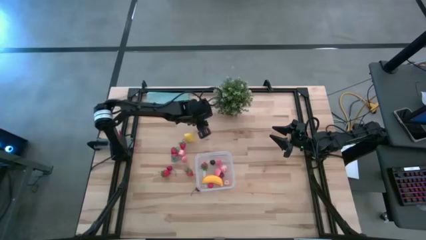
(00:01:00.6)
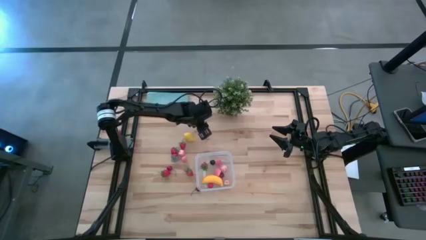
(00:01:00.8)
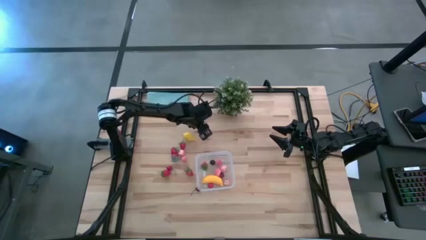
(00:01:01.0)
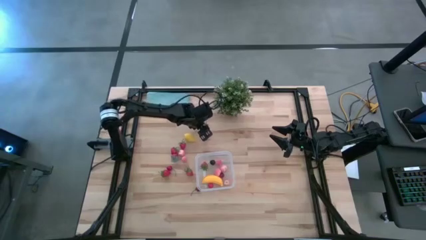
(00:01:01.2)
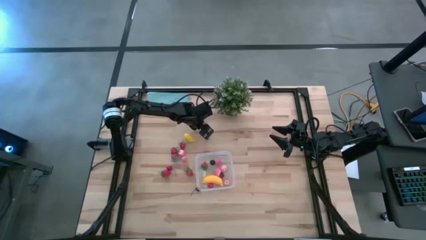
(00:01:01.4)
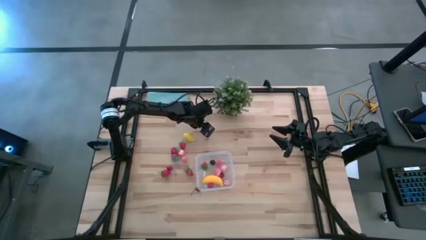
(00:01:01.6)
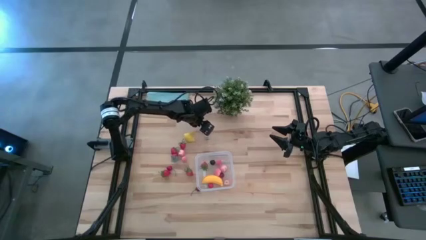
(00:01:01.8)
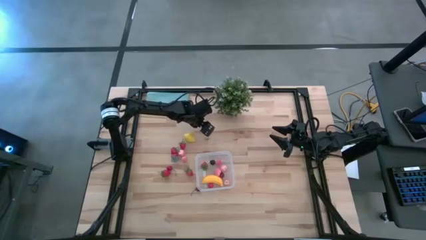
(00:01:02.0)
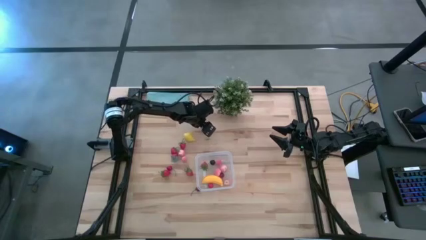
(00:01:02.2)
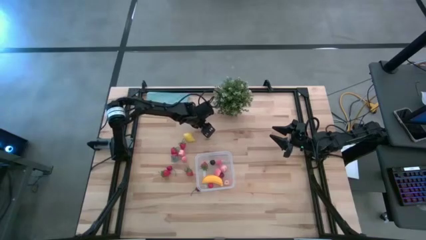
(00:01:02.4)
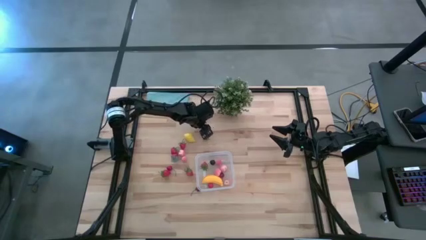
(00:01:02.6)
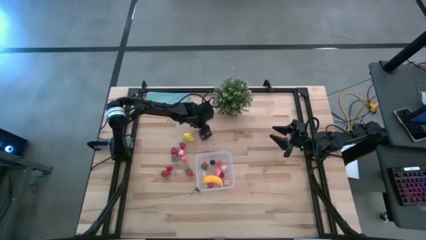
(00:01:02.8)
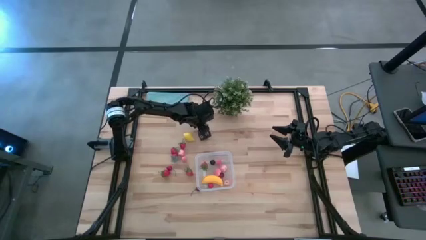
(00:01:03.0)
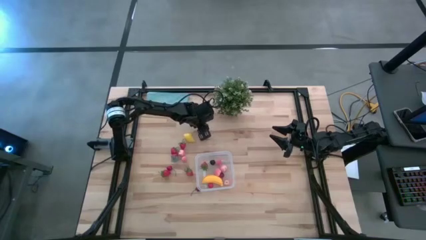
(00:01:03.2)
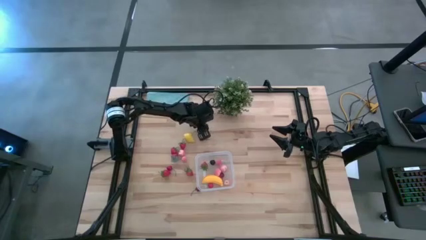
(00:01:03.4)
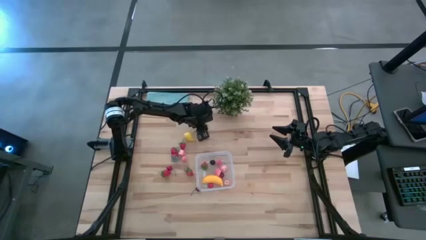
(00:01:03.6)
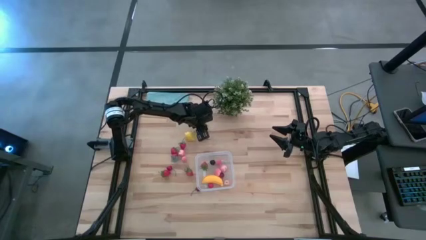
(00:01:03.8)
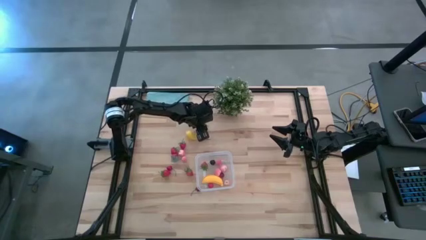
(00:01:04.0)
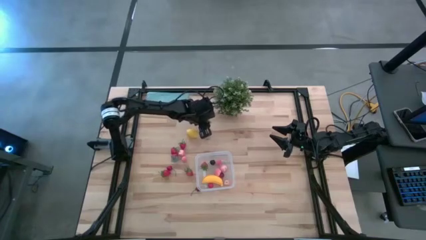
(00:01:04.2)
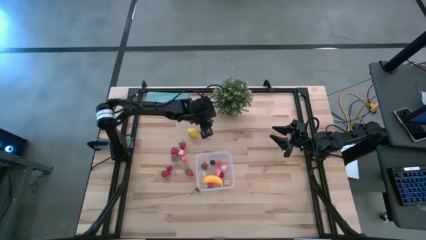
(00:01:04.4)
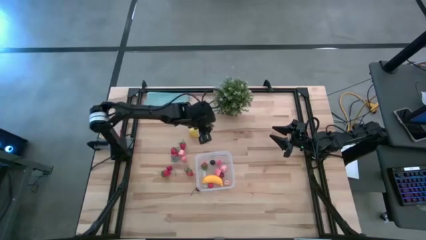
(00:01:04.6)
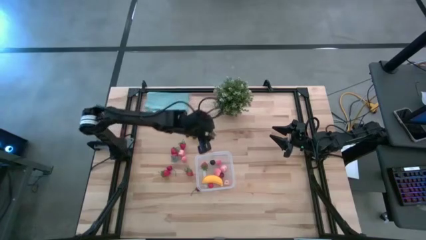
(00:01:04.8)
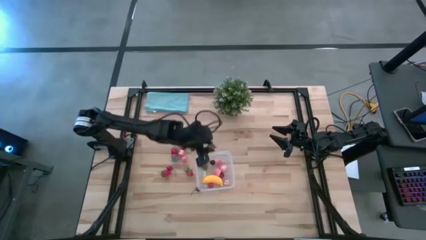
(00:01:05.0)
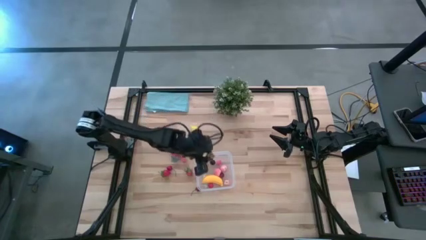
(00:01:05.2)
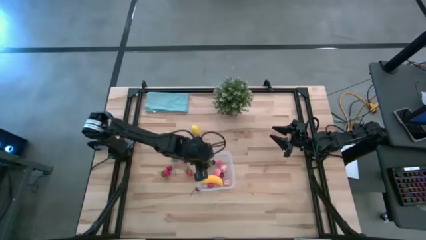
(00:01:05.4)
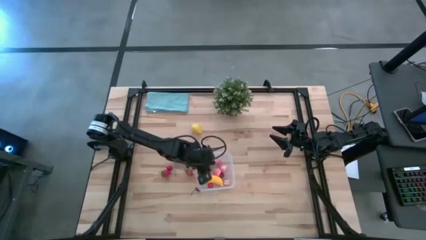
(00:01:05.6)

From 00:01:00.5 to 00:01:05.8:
Task: Pick and placing Produce into tupperware
Put the red strawberry into the transparent bin

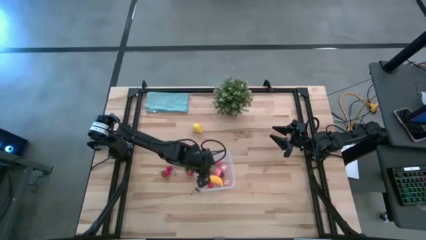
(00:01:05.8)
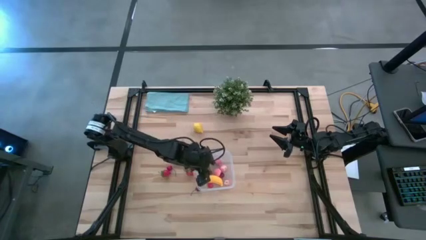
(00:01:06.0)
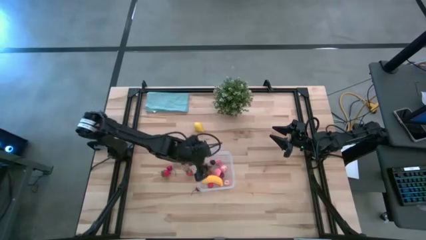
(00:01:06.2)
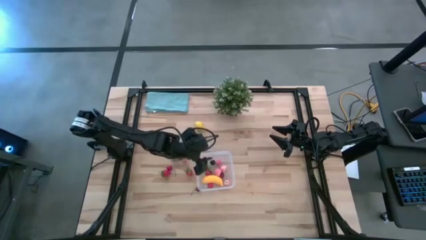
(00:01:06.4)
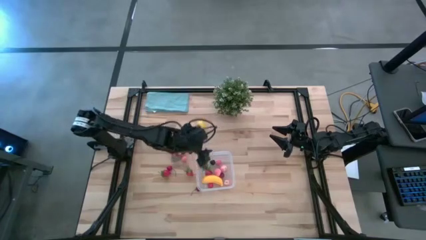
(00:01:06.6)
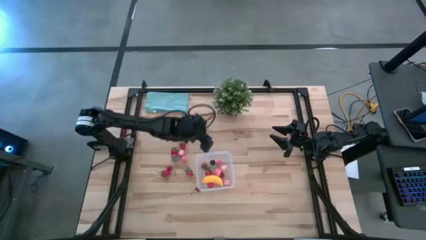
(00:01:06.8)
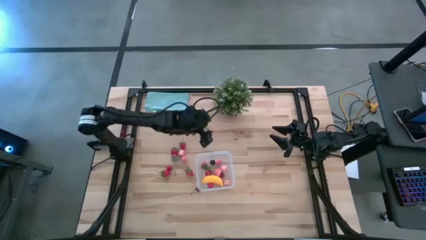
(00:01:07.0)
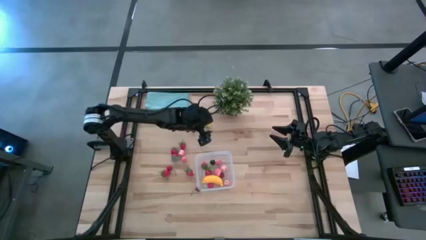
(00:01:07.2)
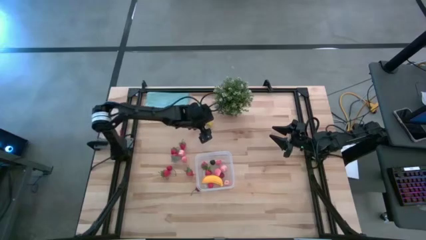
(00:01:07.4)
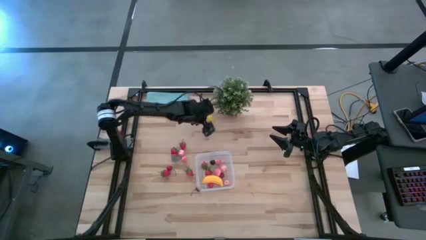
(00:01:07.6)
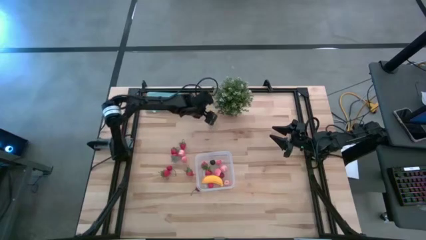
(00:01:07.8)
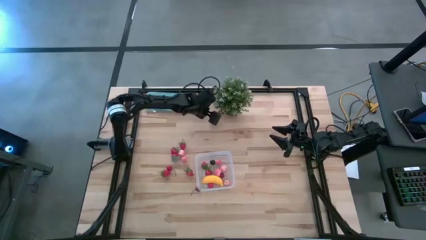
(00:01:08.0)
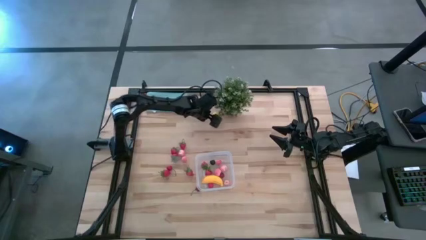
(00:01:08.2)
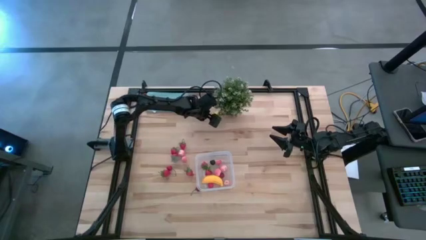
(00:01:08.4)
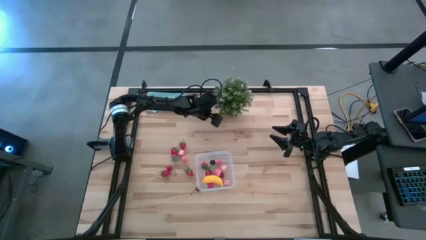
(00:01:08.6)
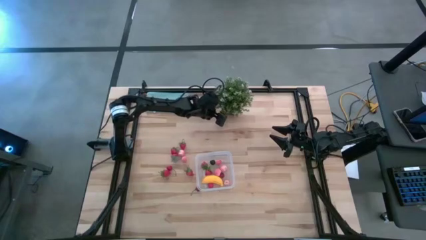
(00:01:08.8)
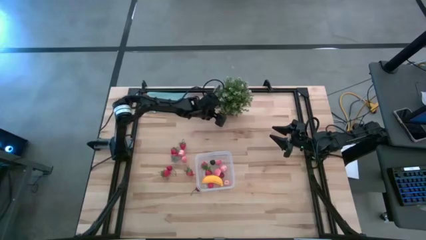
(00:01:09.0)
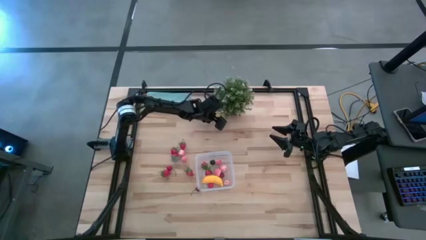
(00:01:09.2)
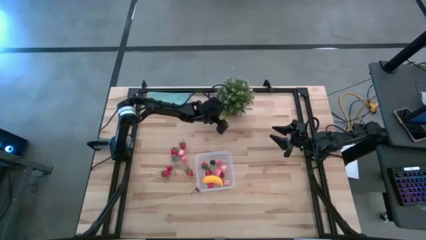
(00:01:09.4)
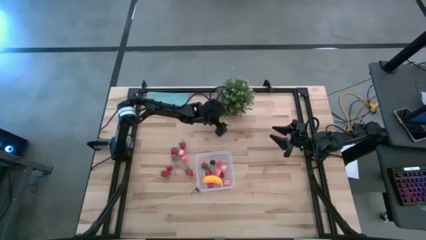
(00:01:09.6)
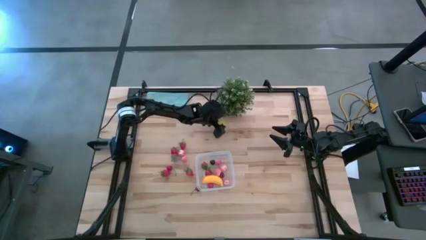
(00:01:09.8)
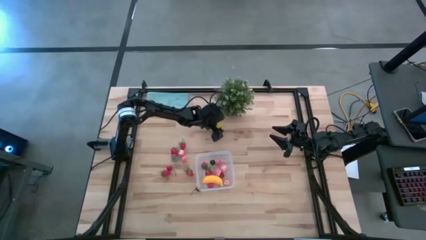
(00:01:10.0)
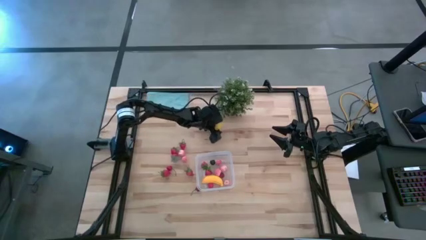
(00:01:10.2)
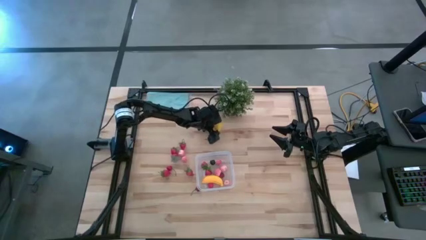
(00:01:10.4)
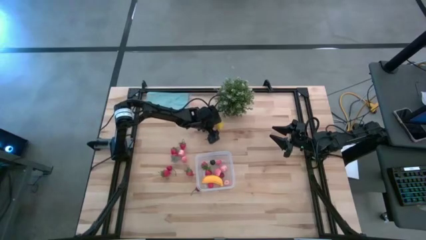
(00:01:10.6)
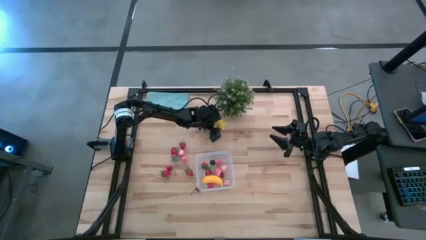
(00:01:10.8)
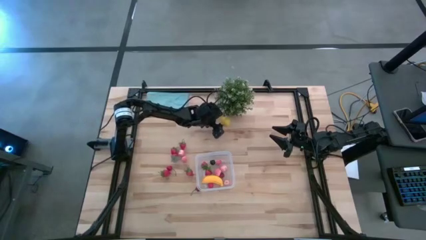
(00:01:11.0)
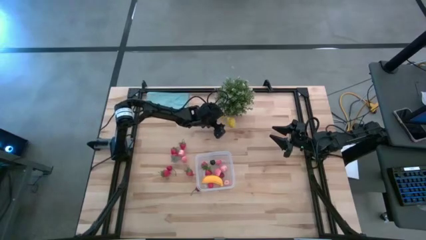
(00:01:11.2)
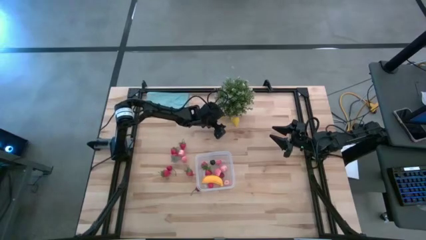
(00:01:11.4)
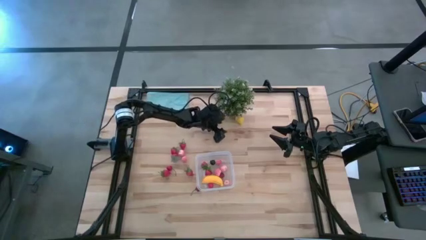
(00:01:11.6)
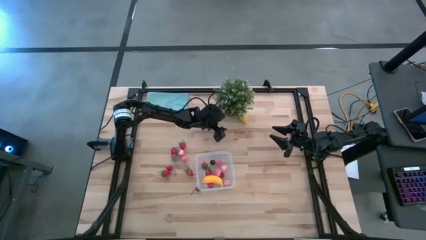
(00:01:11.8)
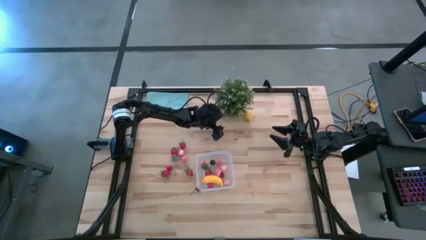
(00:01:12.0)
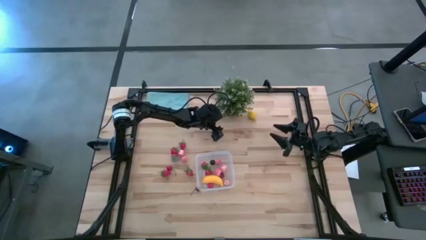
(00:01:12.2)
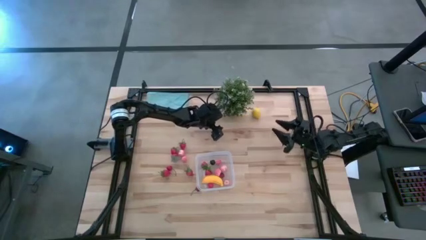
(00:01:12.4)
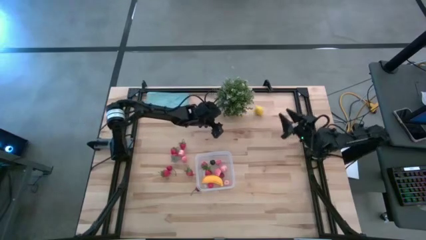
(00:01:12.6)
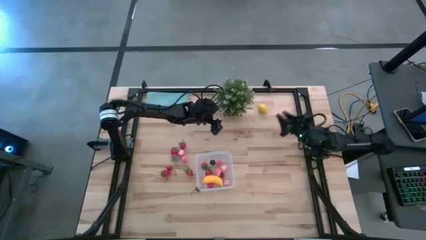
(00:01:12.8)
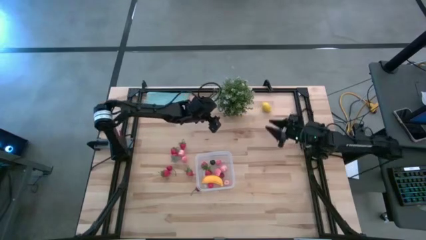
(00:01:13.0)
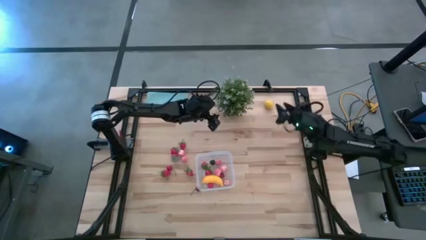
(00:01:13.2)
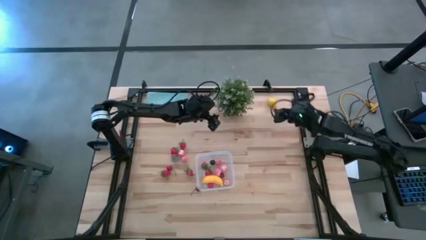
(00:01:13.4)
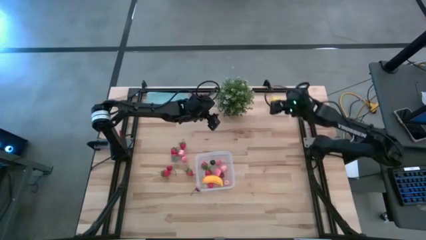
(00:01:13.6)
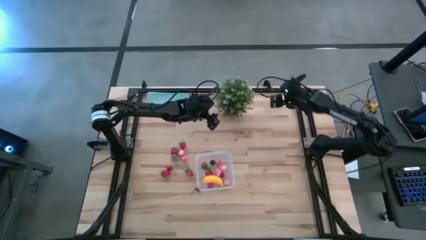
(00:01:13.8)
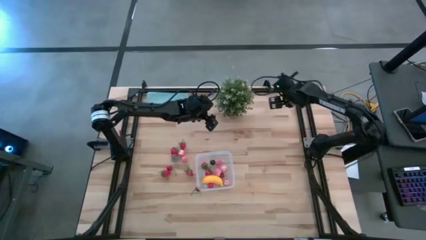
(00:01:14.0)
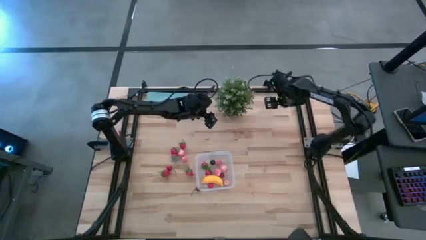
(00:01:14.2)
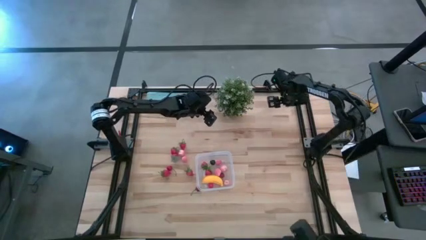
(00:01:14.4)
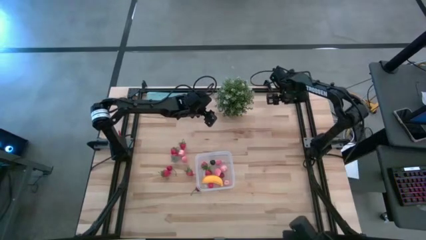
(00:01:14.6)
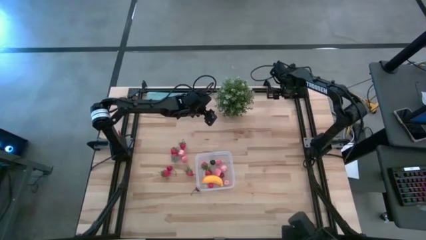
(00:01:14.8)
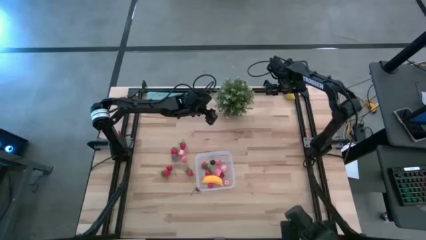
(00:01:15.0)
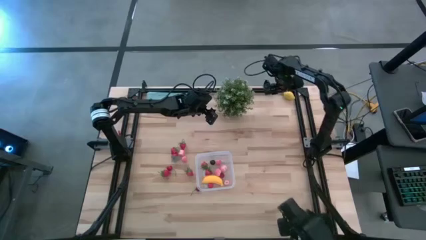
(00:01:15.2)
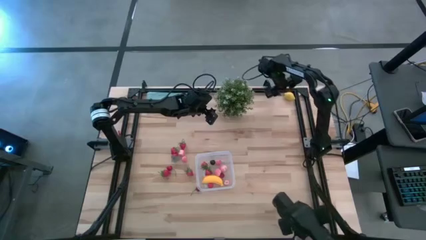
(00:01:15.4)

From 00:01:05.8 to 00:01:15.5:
Put the yellow lemon into the transparent bin

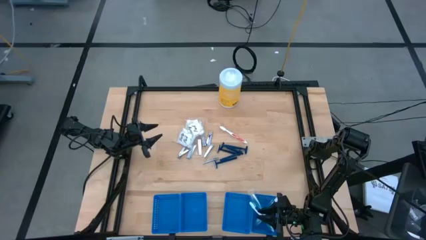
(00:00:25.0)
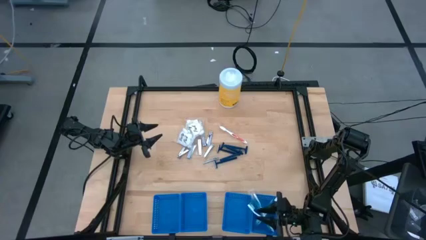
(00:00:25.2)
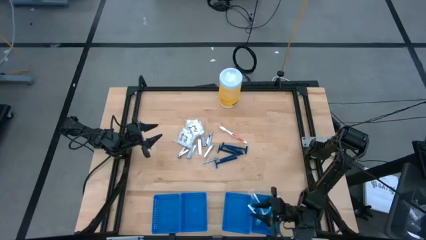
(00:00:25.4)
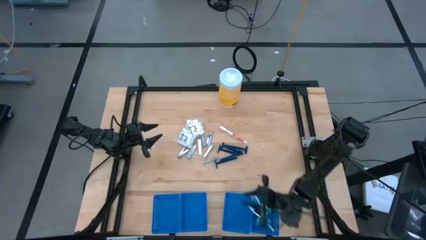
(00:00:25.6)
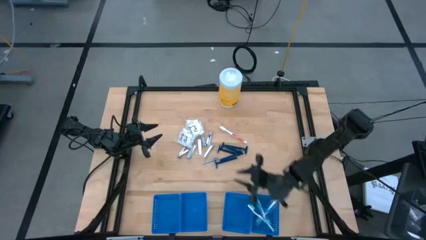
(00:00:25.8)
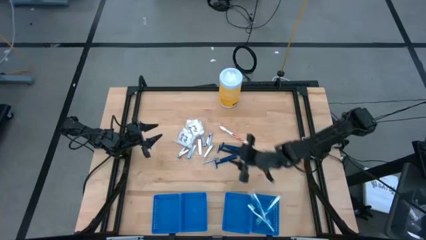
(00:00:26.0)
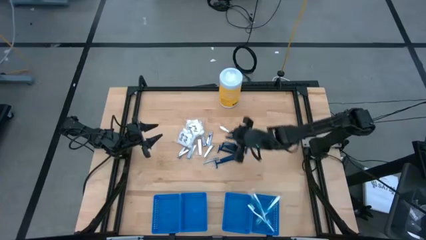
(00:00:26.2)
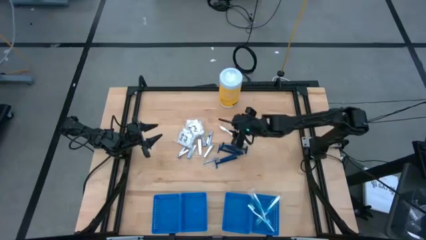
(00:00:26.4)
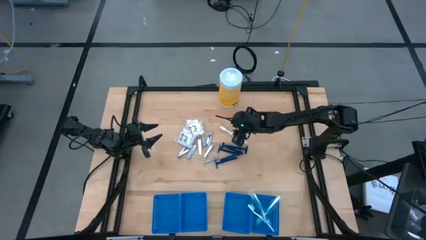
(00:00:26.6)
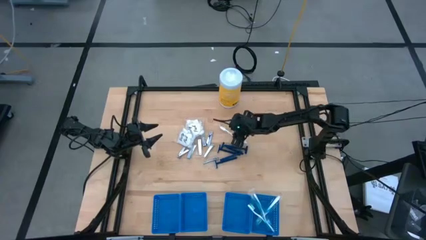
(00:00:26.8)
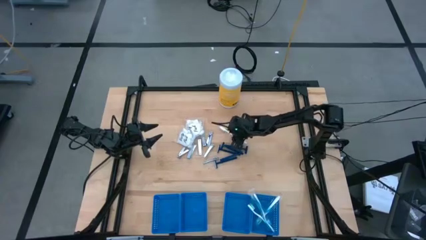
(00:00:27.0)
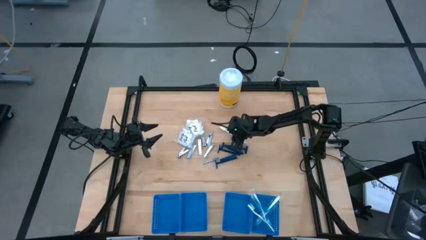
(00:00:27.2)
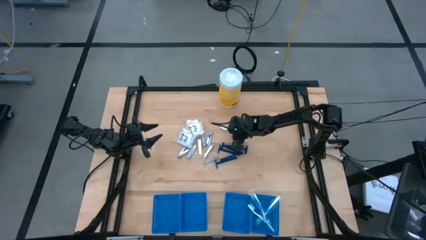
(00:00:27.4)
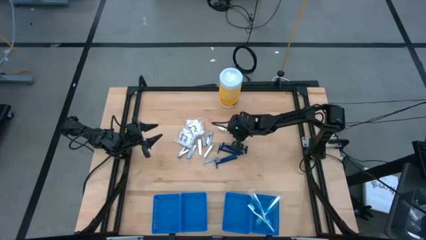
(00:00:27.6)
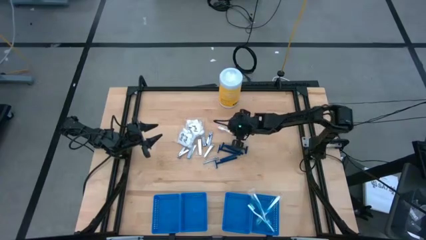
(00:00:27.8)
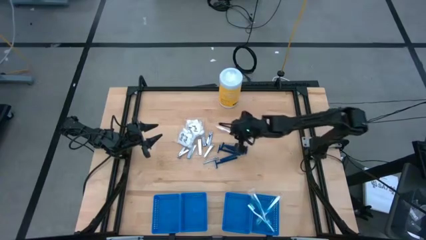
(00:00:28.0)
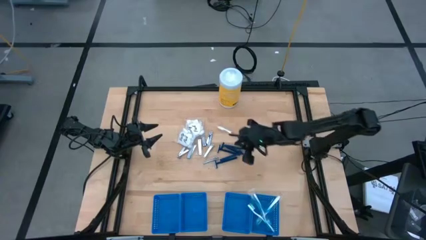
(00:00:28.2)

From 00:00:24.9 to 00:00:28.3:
Task: Pick & Place Travel size toiletries
Put the orange toothbrush into the blue basket
